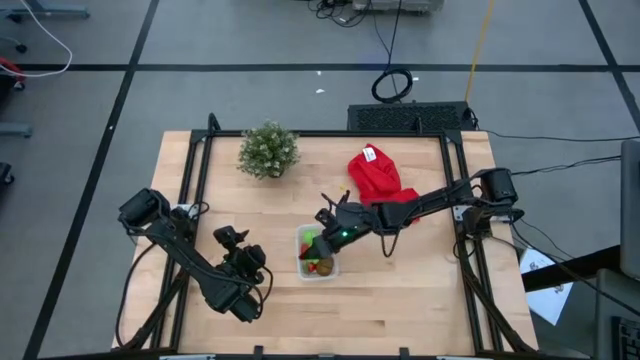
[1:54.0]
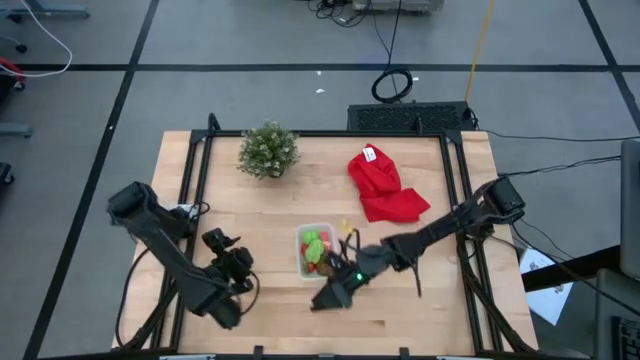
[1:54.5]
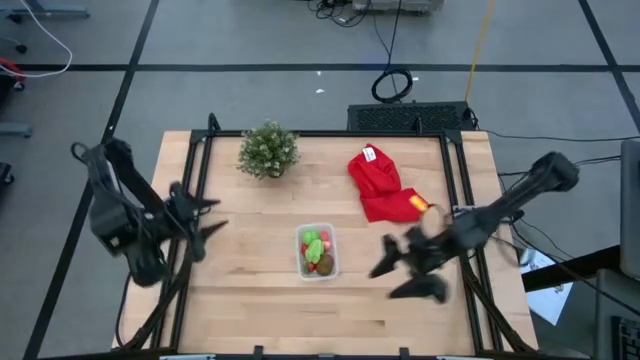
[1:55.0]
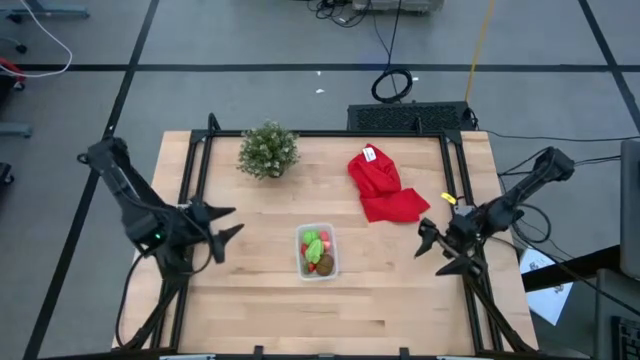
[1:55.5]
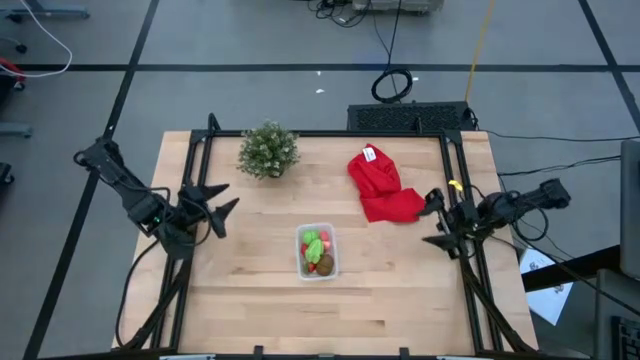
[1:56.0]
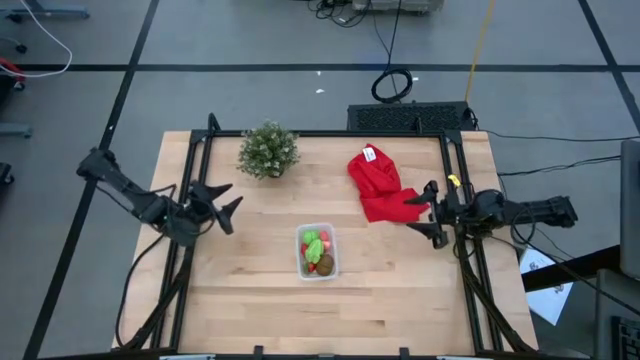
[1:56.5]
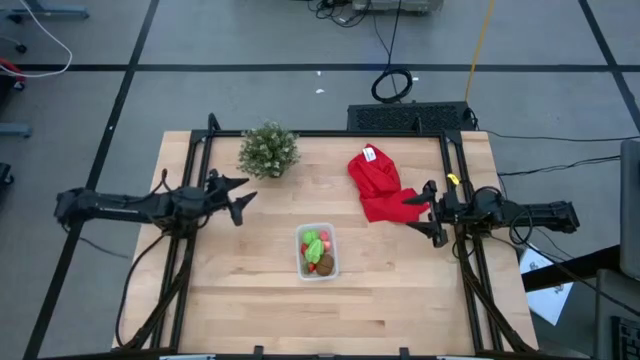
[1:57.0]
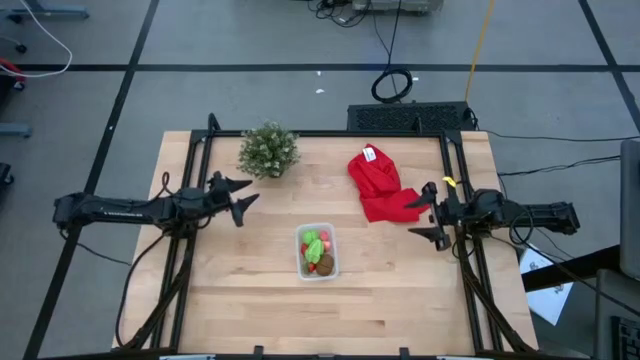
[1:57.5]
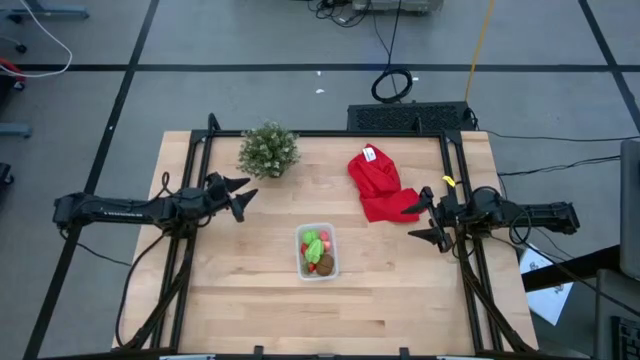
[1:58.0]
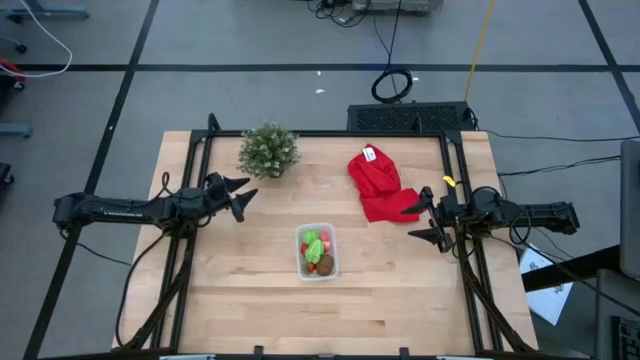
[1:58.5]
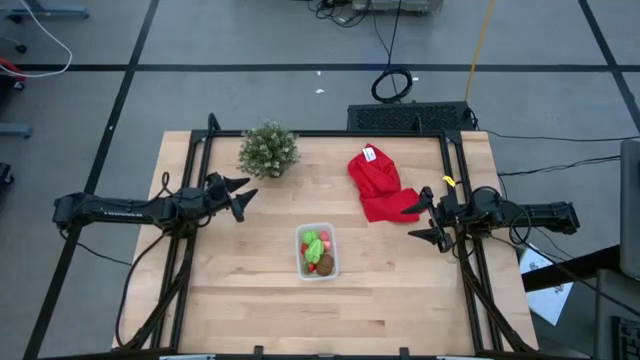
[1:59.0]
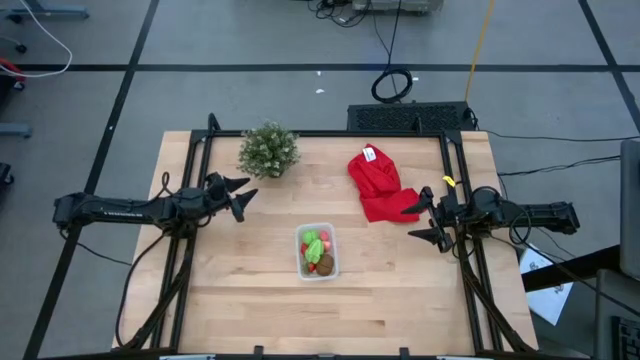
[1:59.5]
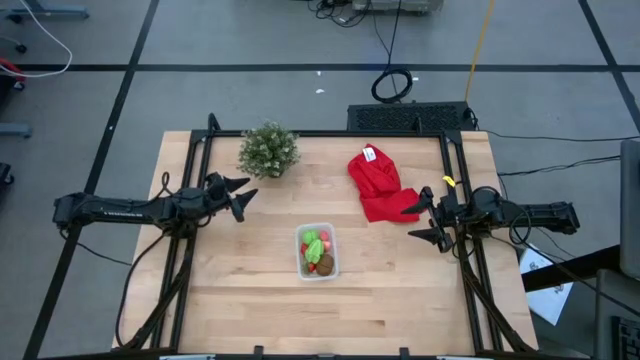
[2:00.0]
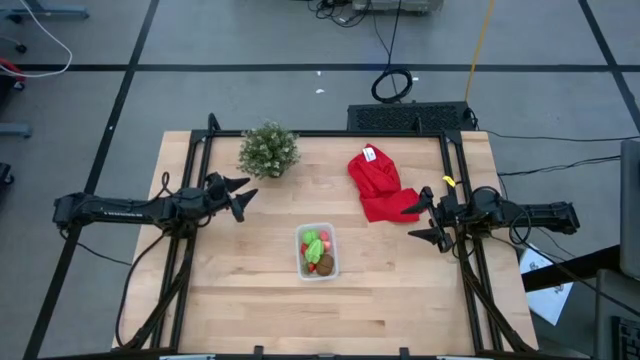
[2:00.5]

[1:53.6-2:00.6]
Task: Pick and placing Produce into tupperware
Return to Home Position

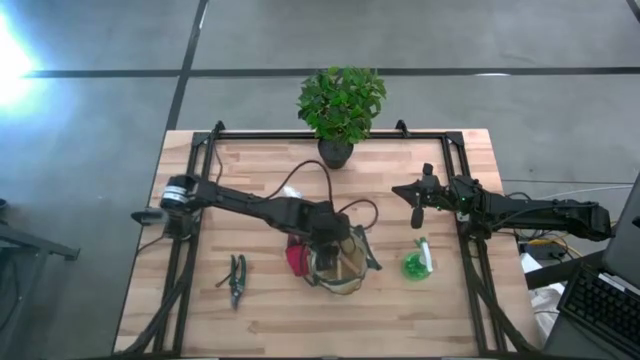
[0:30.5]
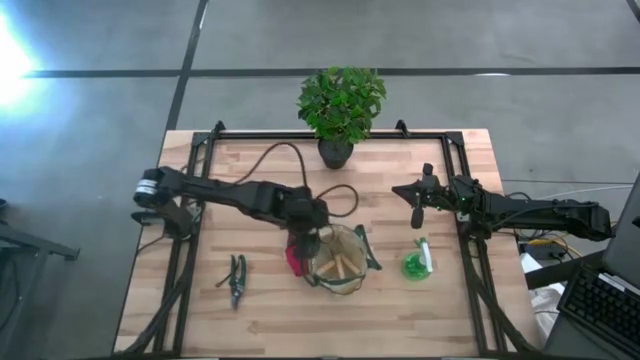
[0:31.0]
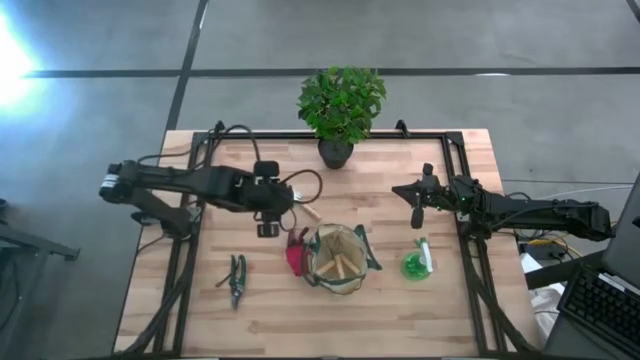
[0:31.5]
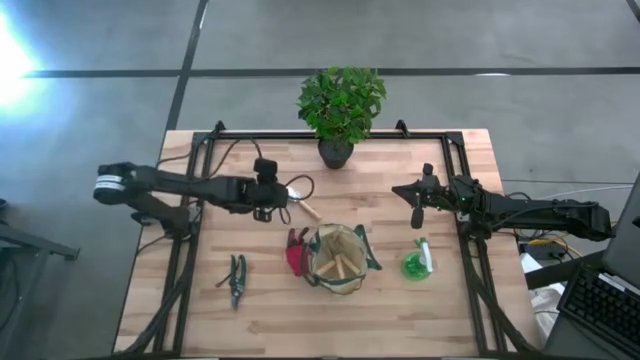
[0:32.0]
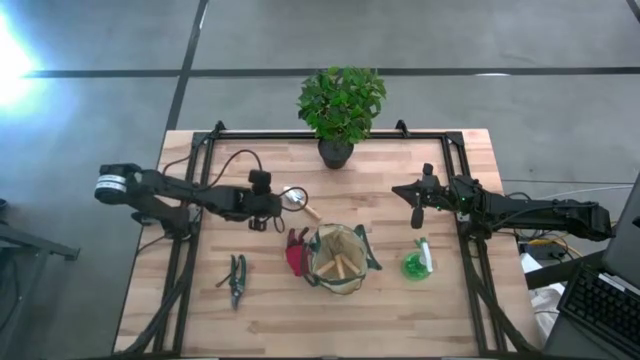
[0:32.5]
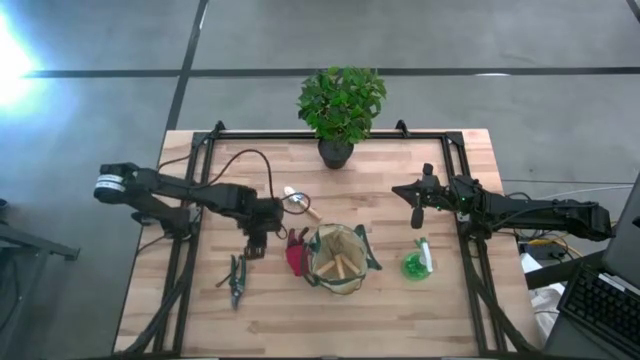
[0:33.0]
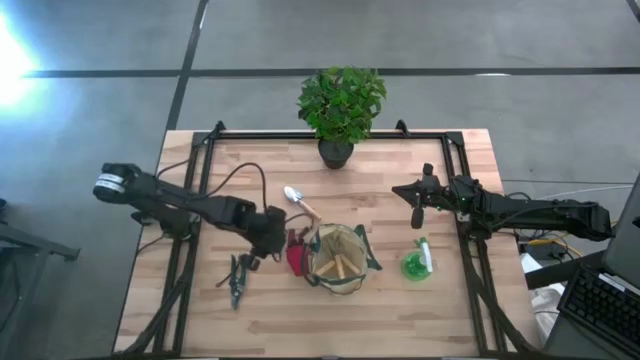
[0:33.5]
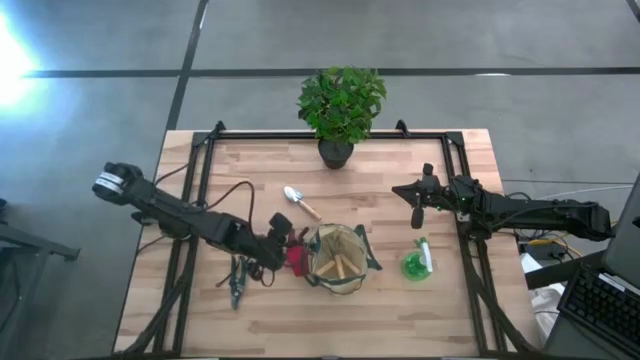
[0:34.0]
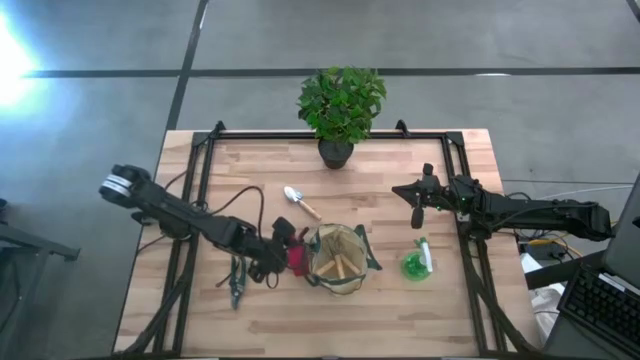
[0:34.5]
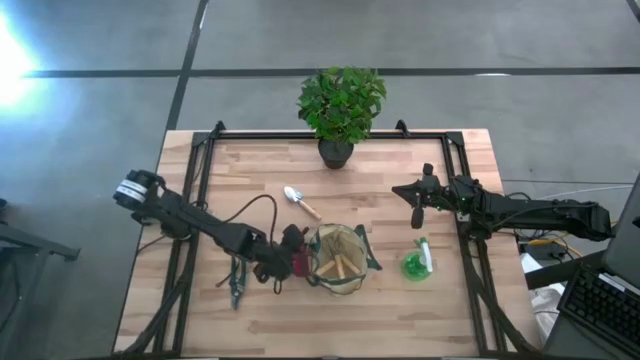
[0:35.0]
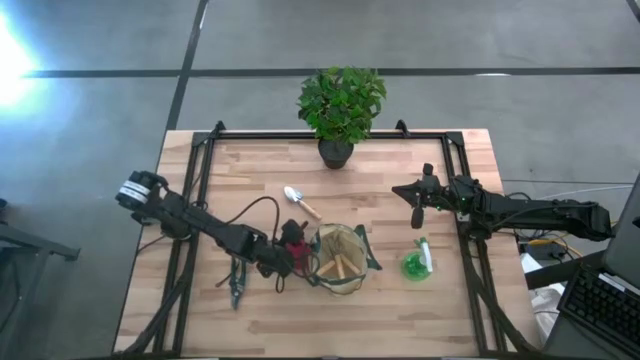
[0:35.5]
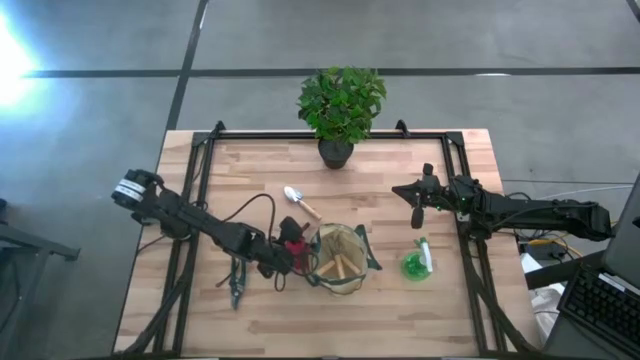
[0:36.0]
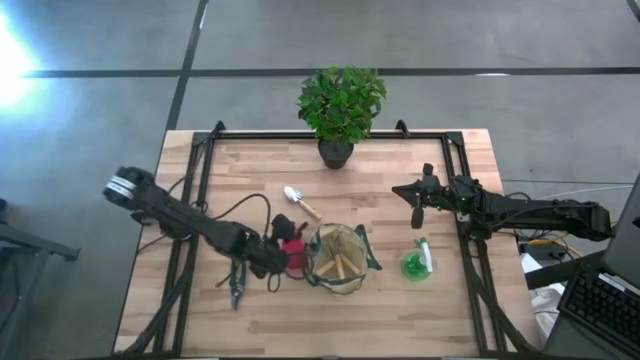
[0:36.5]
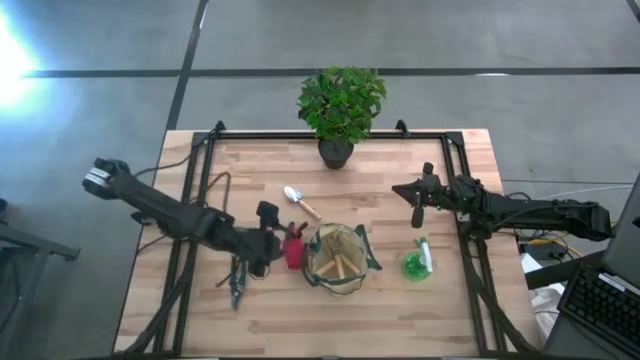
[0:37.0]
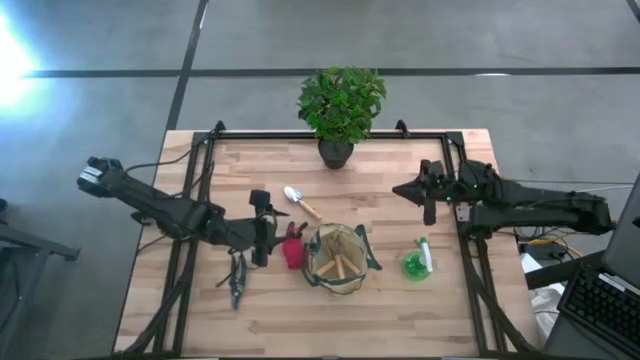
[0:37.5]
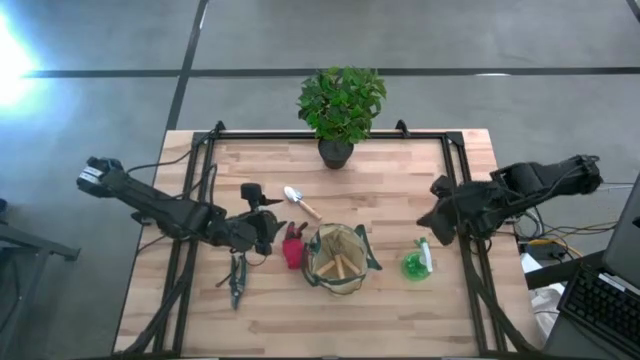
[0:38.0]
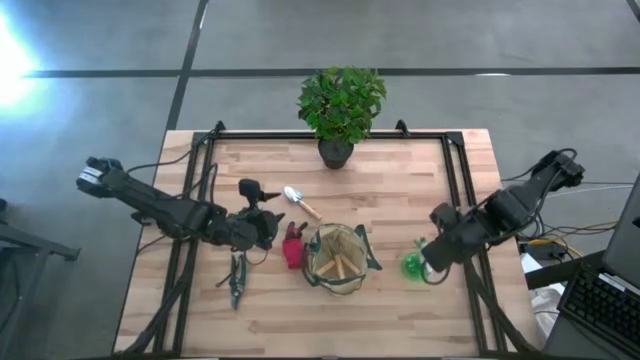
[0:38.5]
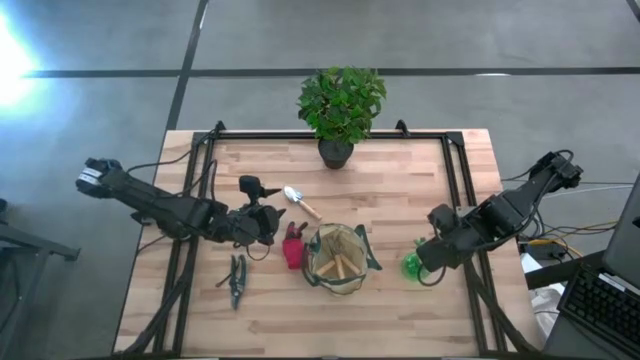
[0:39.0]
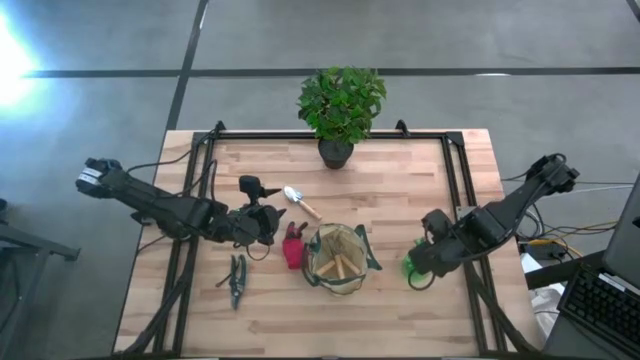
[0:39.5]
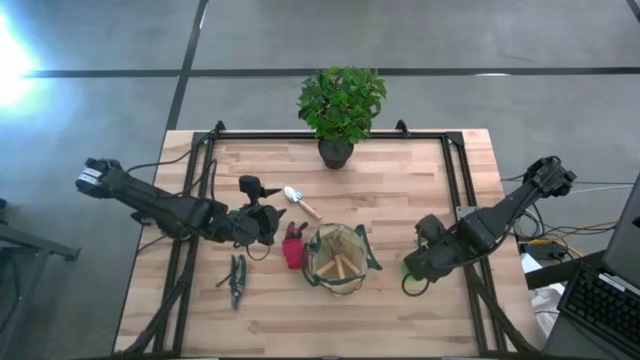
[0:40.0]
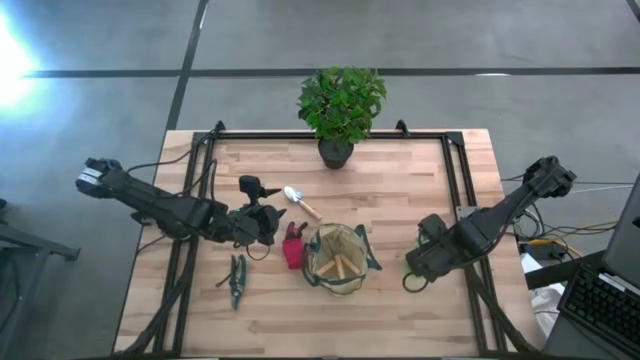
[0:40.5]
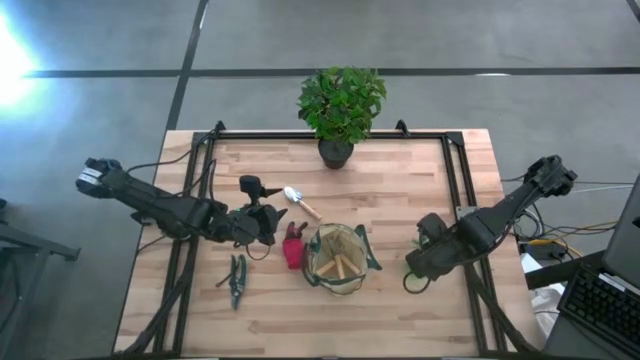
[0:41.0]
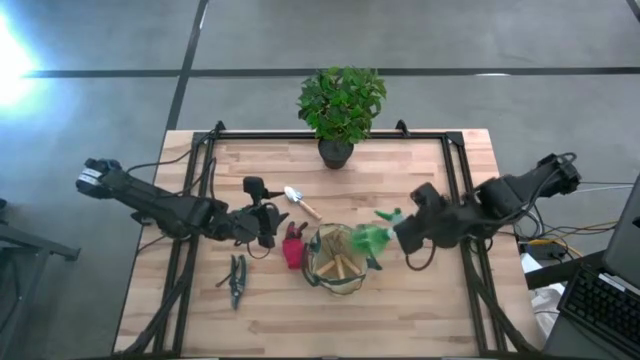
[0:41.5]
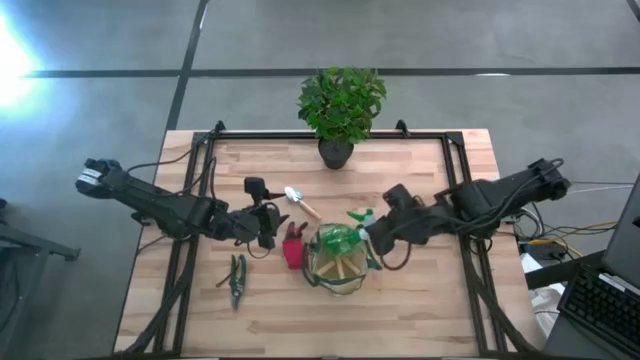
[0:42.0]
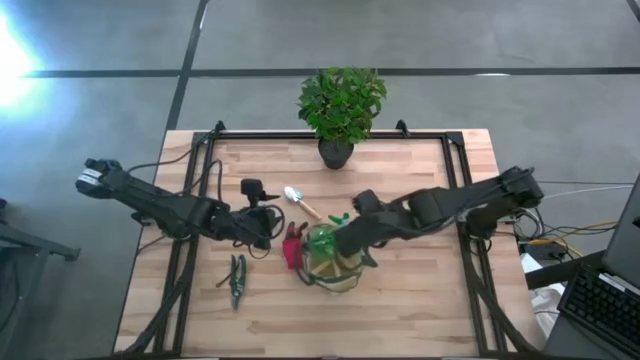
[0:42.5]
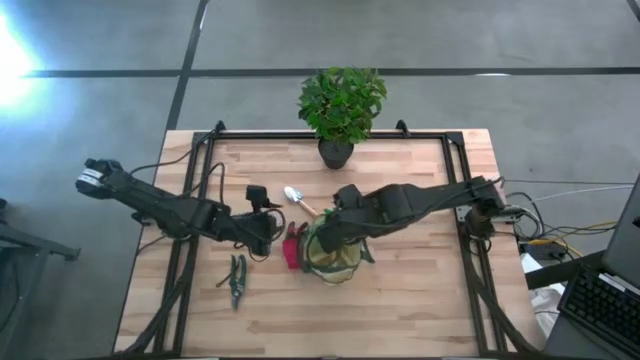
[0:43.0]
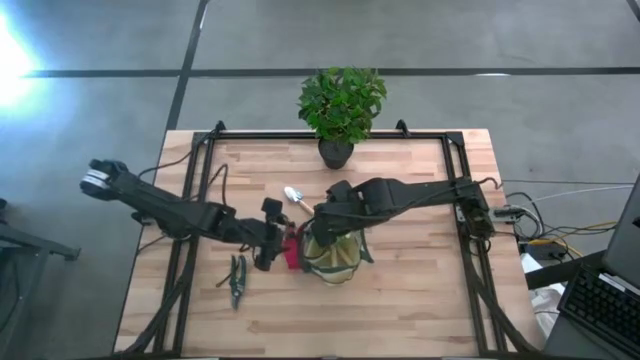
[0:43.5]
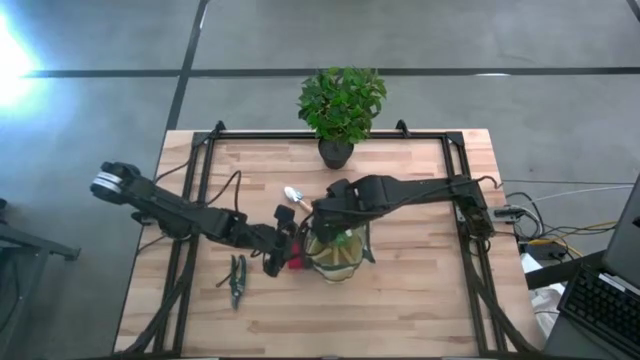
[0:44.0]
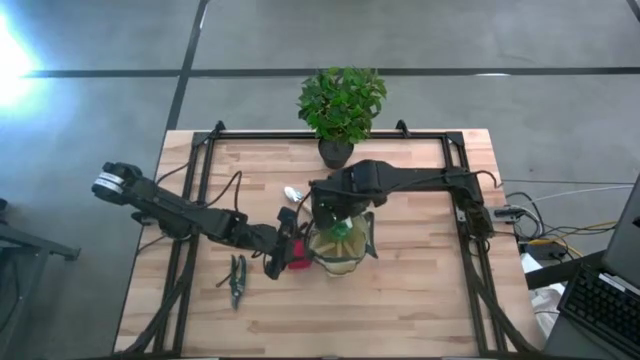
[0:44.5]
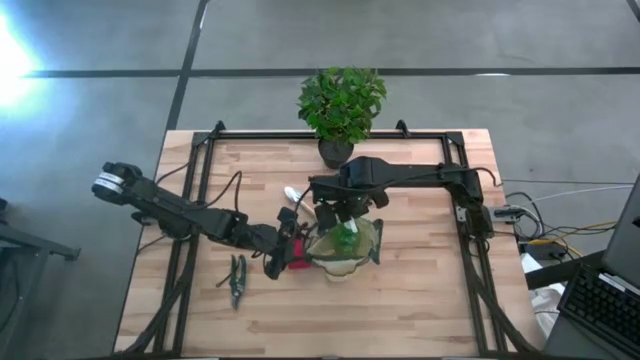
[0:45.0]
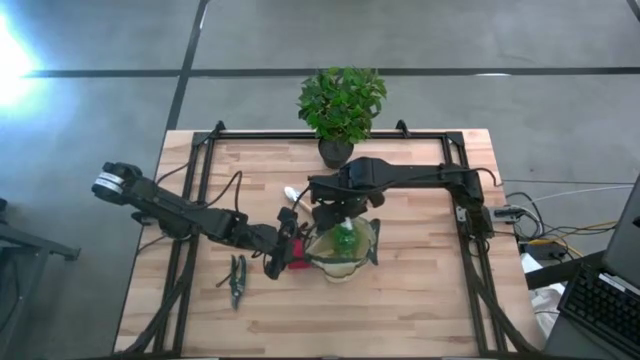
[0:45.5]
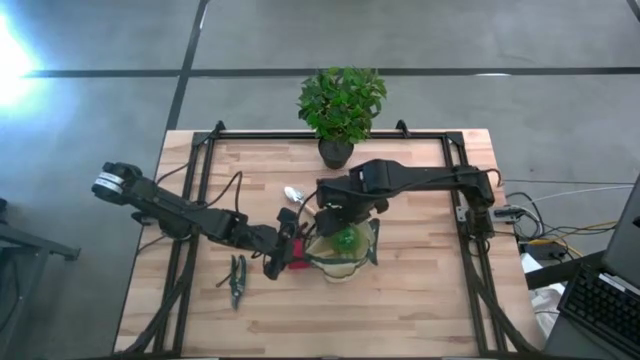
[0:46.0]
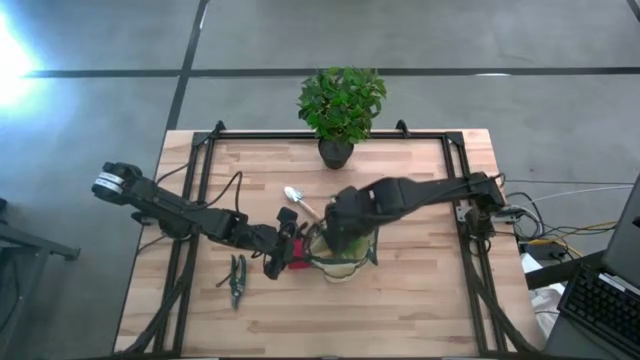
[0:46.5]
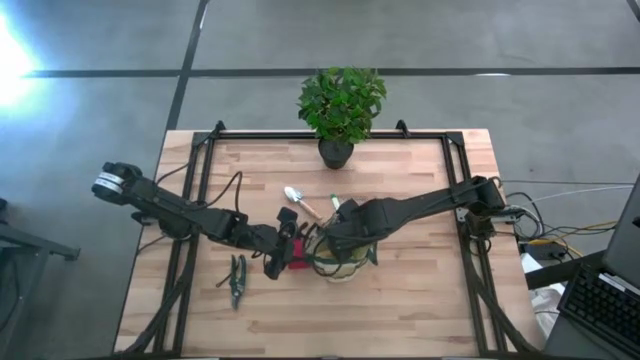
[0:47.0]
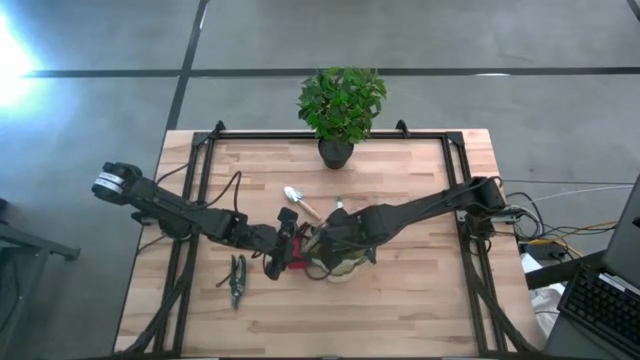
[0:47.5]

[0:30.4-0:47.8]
Task: Pick & Place Garden tools in Gardening bag
Put the green spray bottle into the gardening bag
